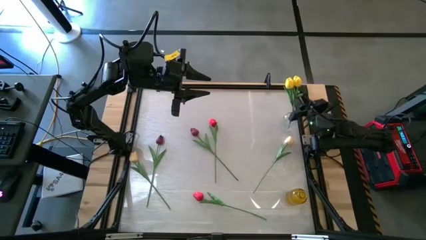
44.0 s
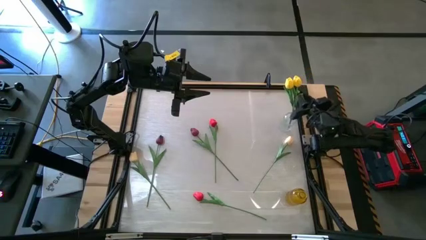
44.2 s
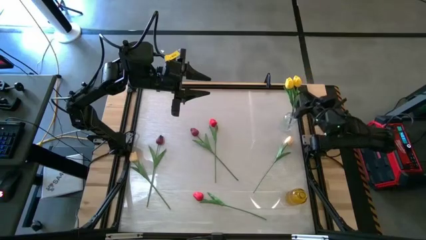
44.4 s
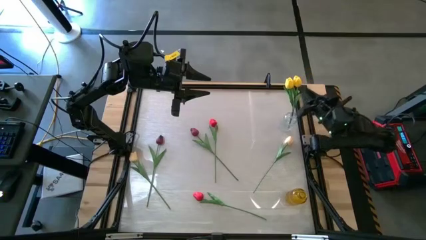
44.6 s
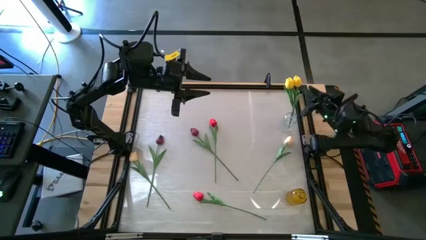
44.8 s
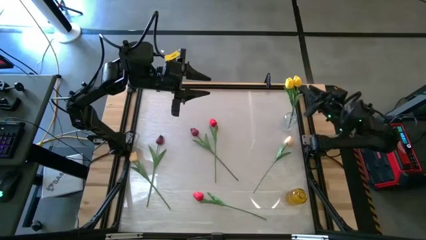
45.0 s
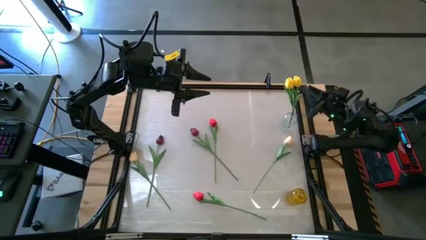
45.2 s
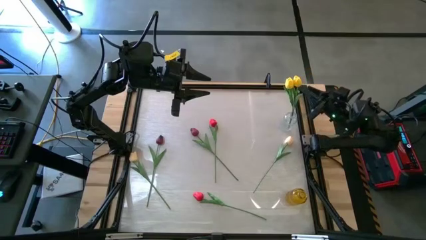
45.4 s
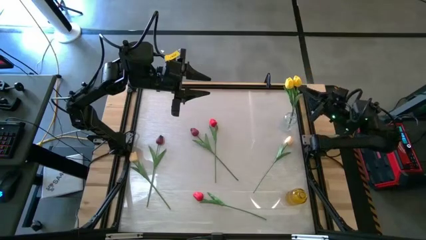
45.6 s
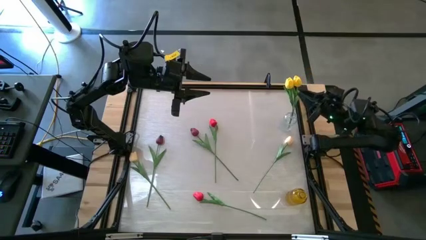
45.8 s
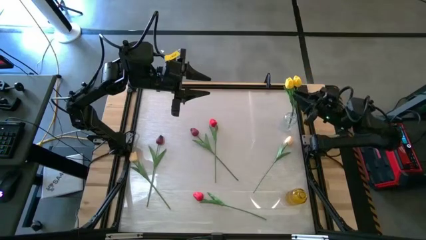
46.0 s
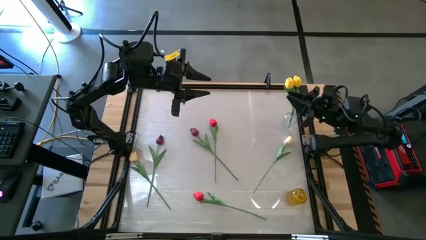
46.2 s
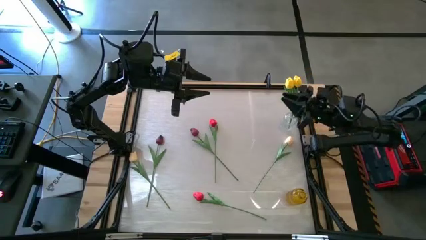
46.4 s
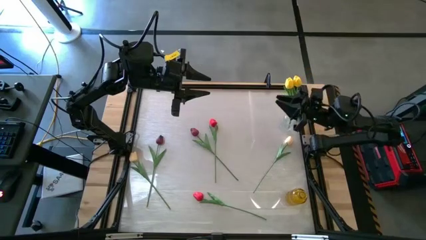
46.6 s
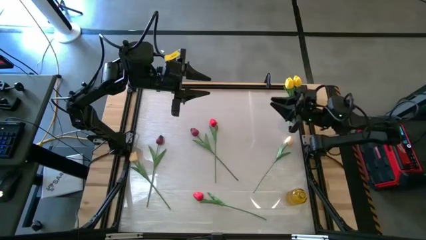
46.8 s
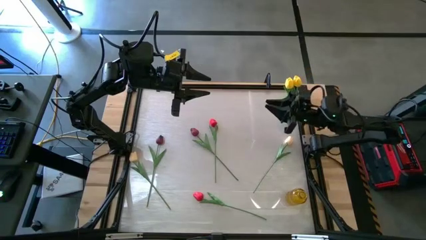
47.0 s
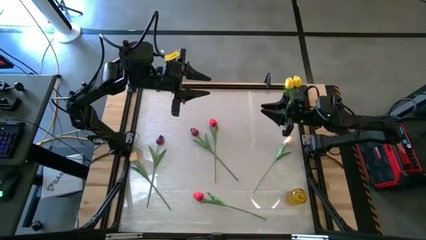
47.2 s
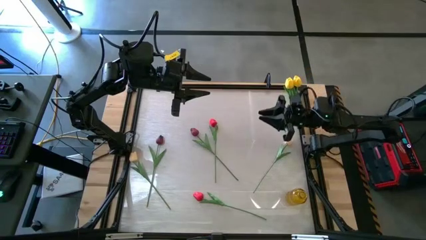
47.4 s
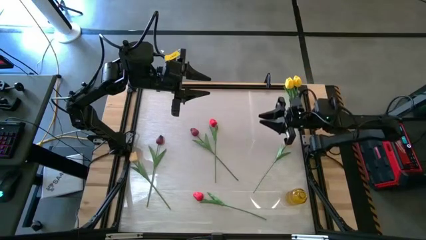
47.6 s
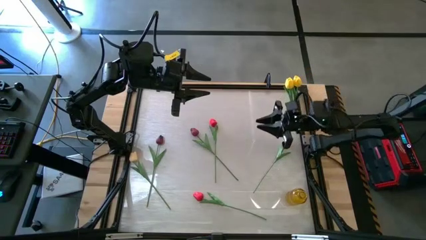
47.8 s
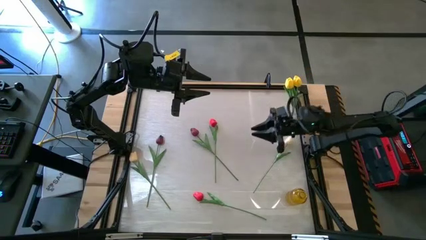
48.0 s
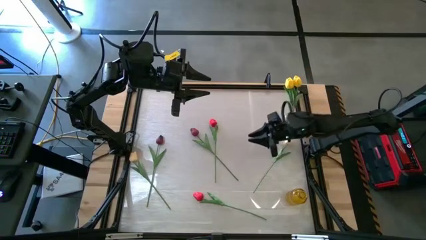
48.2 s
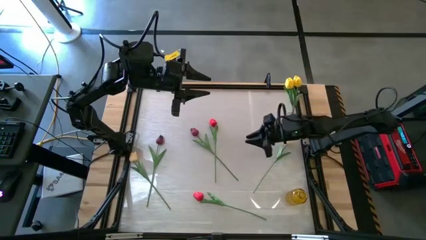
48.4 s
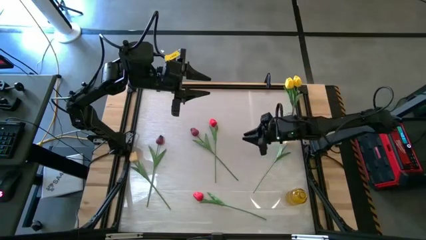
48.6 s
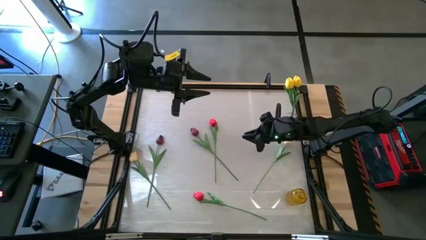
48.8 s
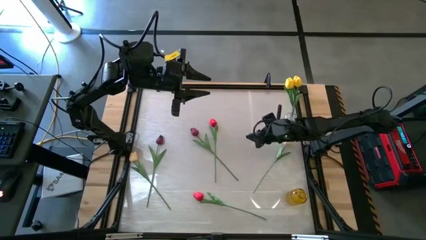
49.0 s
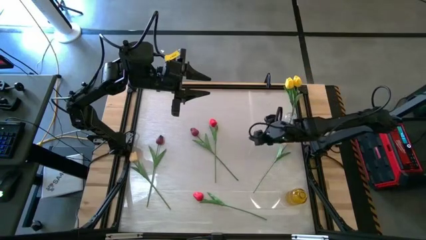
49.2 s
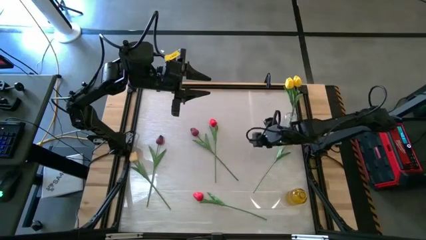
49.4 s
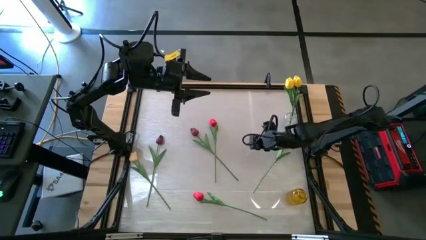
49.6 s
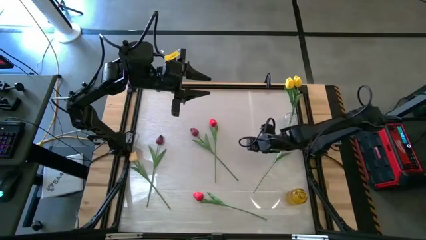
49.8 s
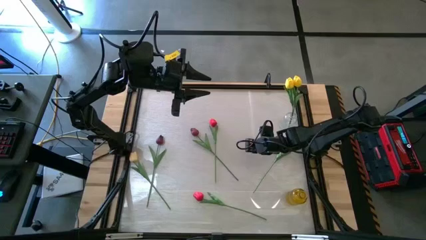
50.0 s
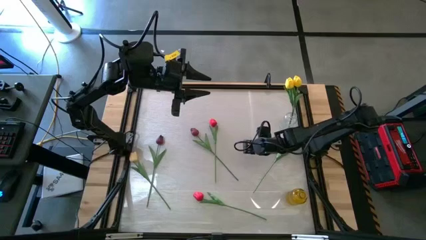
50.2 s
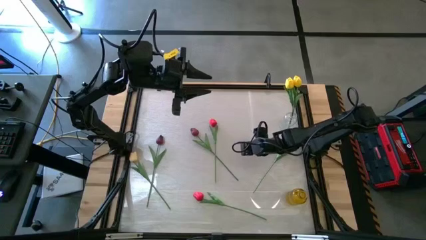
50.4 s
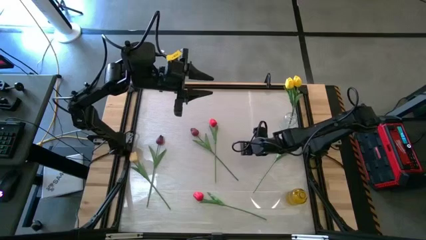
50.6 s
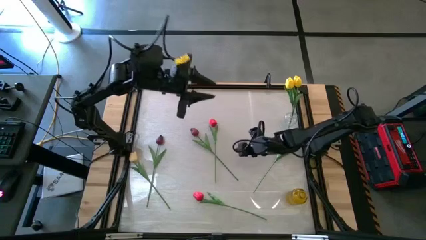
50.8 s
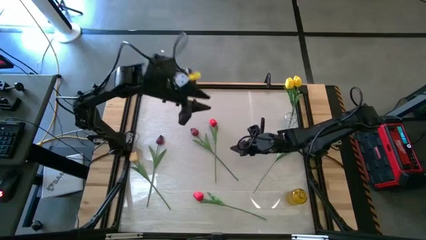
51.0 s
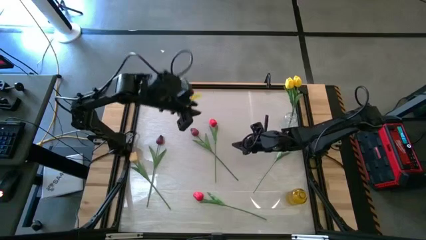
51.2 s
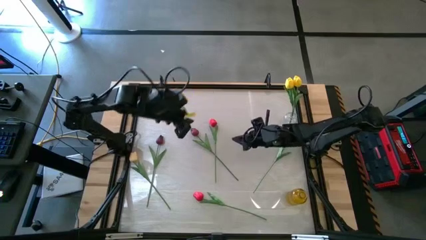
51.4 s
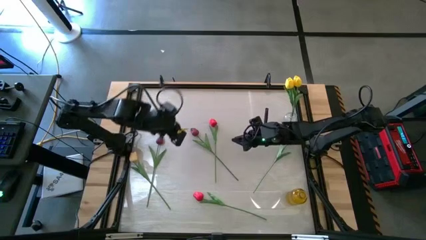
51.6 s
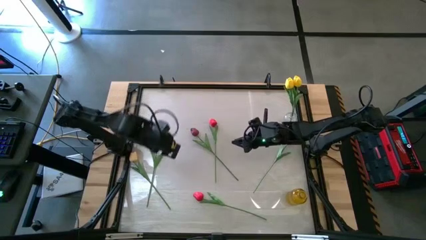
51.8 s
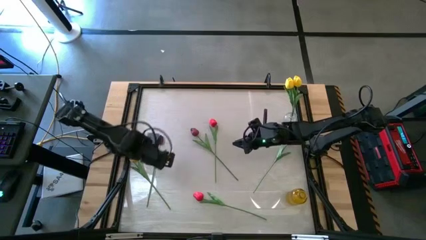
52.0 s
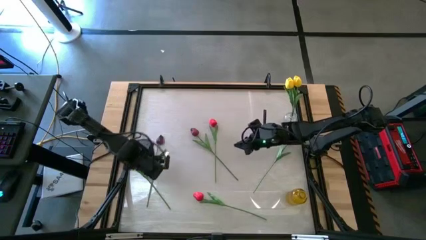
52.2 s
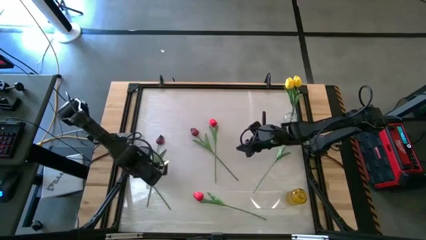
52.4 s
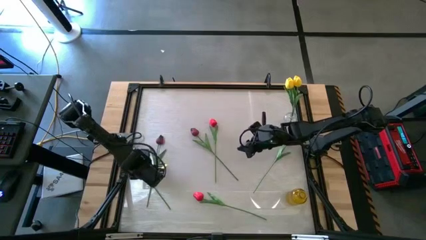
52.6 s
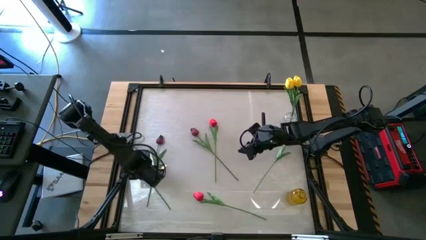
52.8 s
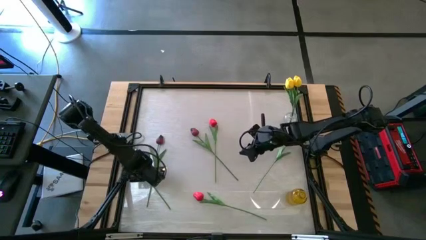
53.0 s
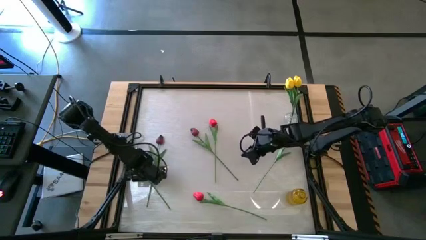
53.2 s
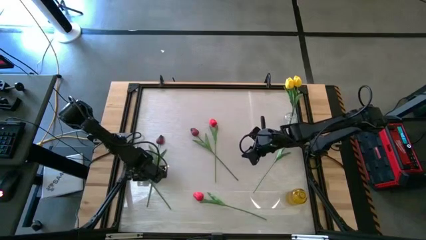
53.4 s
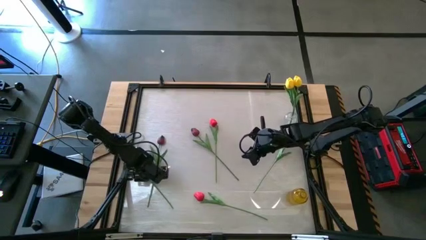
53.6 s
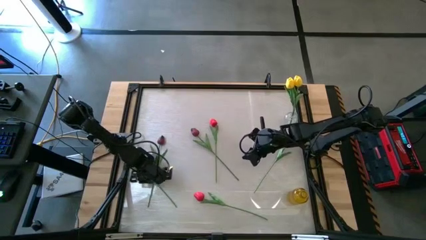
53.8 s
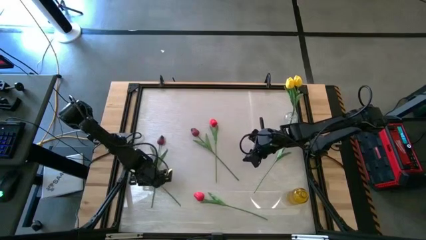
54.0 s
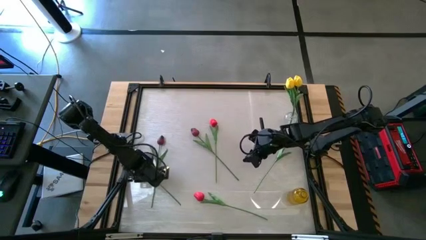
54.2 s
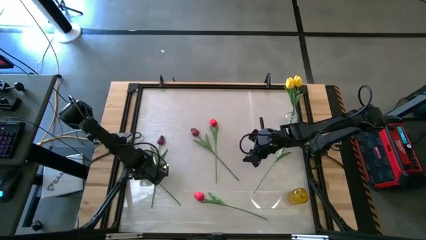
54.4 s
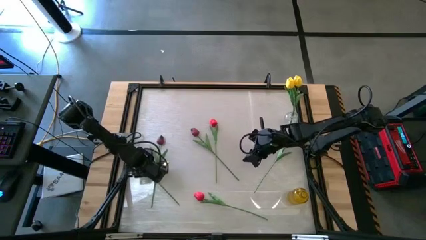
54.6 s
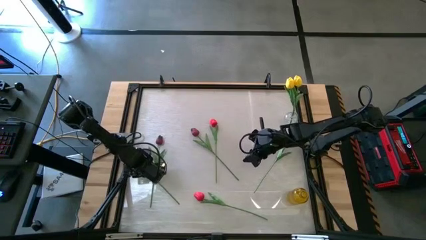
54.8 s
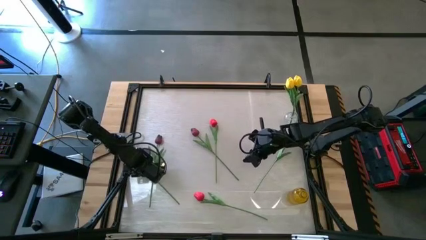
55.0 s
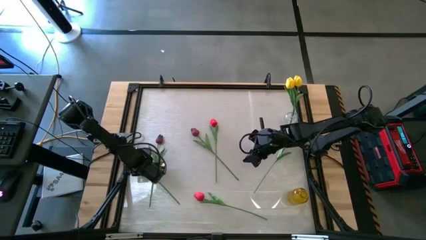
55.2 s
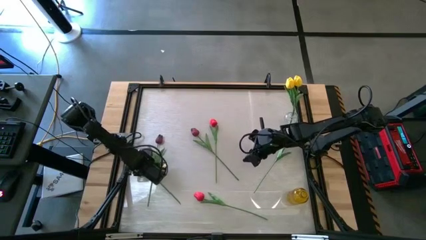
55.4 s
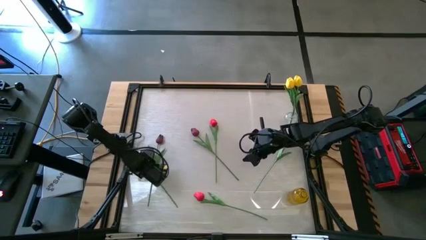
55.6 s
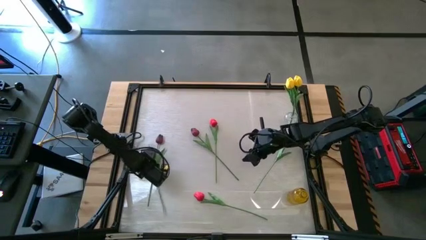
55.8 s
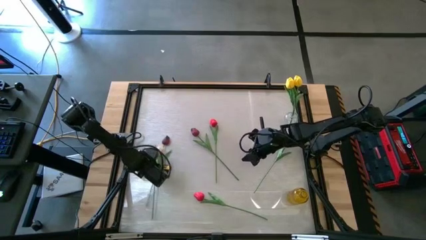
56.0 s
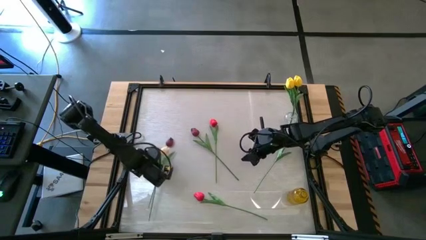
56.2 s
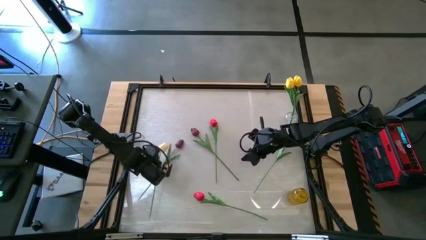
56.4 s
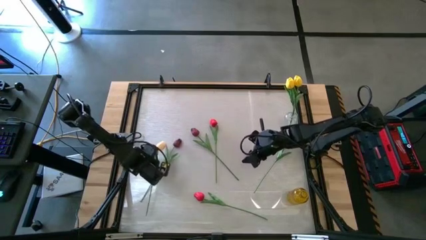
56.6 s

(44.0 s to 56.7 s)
Task: Sort flowers into vase by color
Put the left white tulip into the transparent vase
